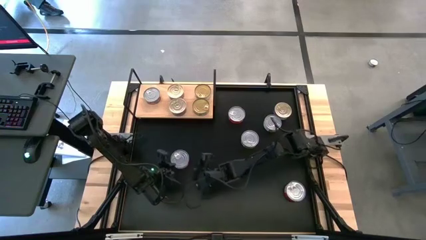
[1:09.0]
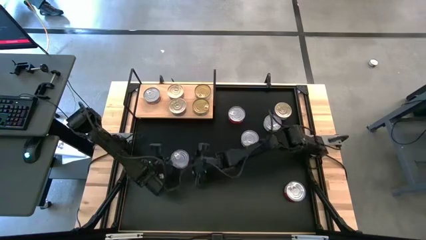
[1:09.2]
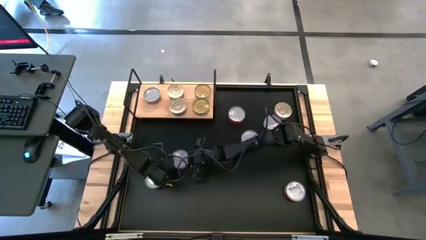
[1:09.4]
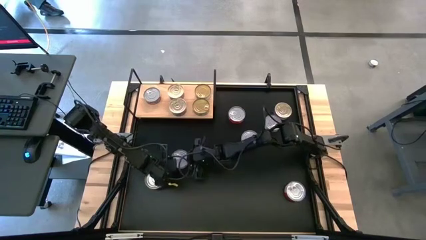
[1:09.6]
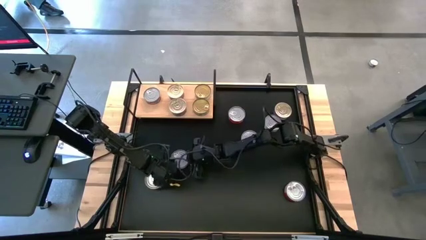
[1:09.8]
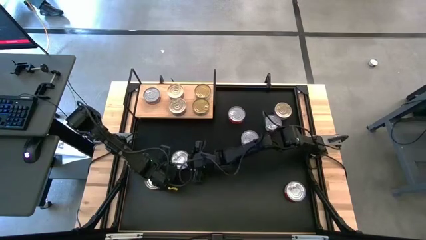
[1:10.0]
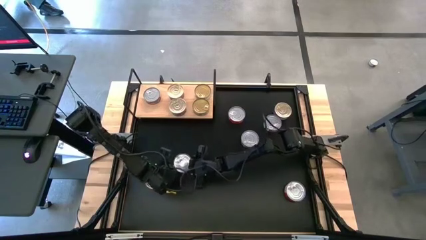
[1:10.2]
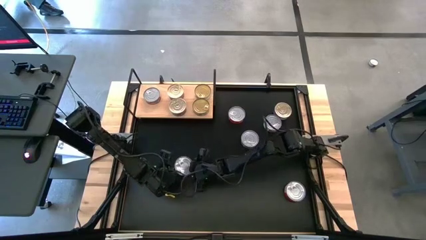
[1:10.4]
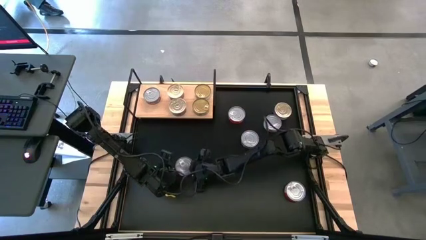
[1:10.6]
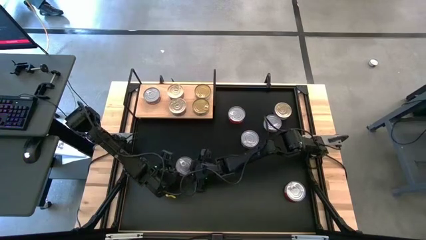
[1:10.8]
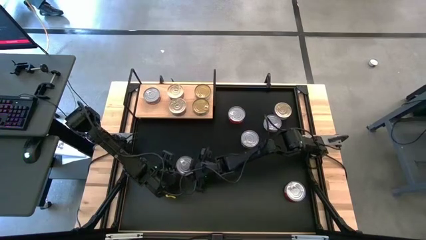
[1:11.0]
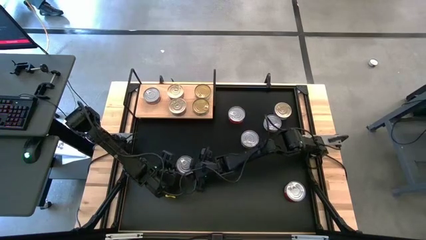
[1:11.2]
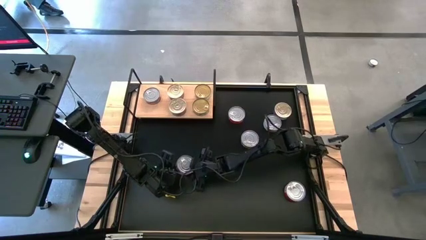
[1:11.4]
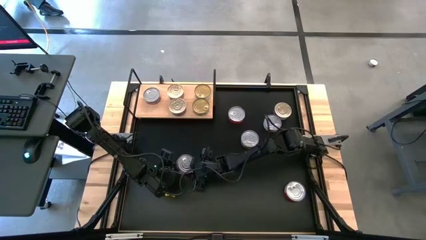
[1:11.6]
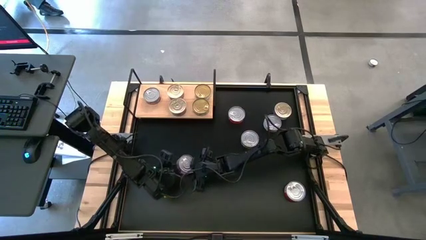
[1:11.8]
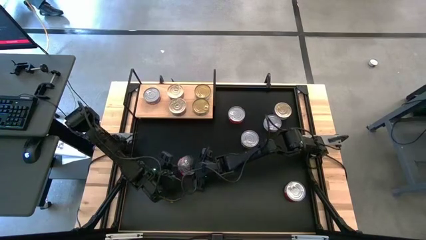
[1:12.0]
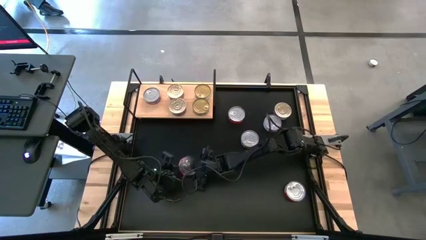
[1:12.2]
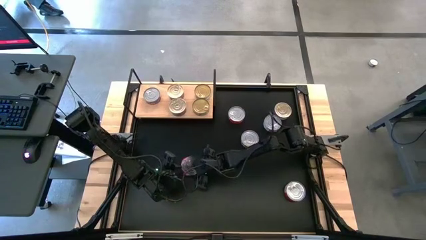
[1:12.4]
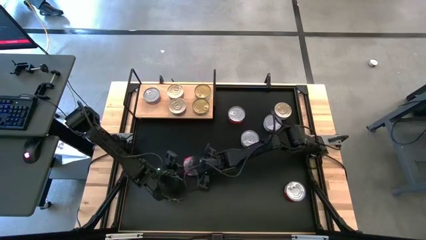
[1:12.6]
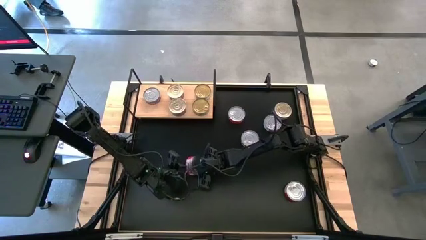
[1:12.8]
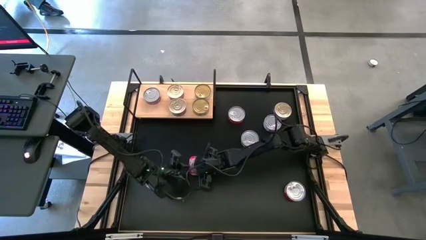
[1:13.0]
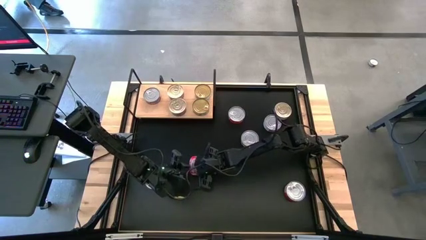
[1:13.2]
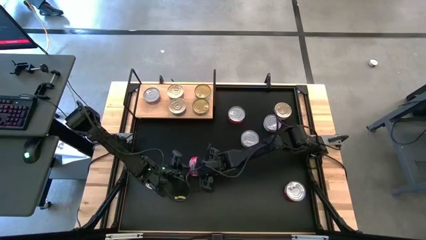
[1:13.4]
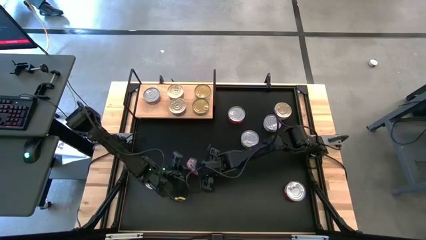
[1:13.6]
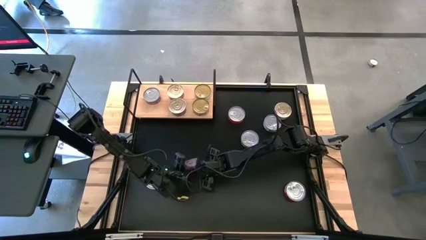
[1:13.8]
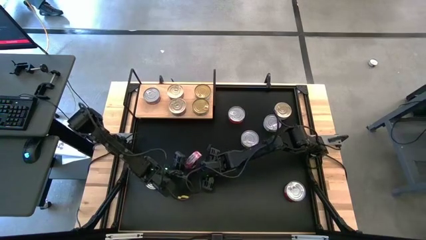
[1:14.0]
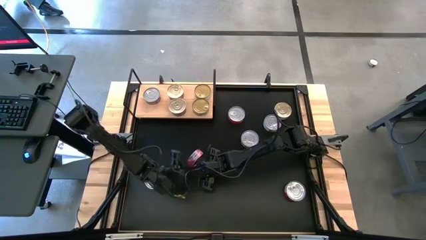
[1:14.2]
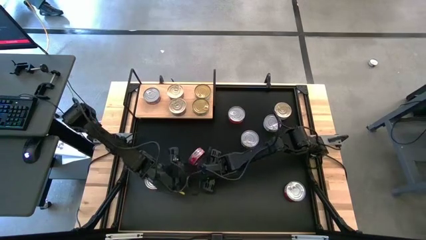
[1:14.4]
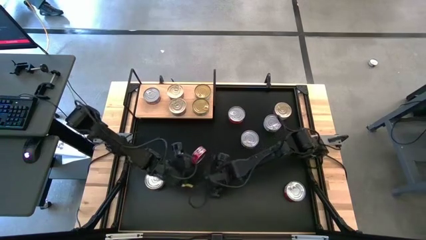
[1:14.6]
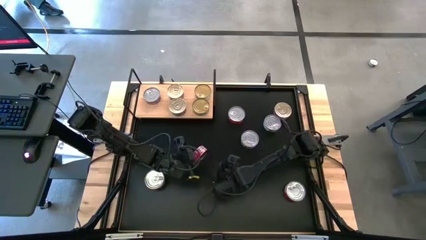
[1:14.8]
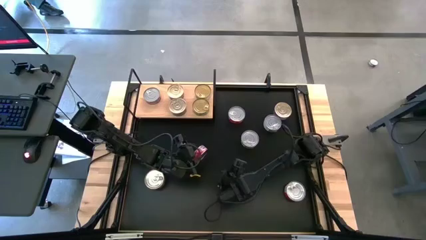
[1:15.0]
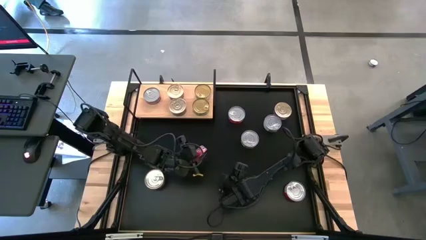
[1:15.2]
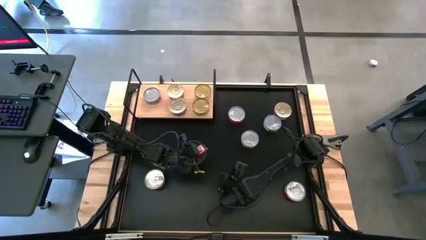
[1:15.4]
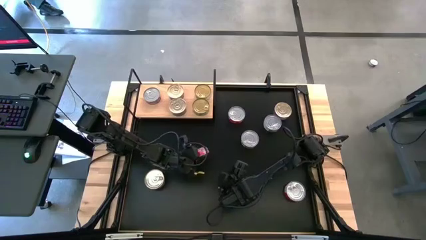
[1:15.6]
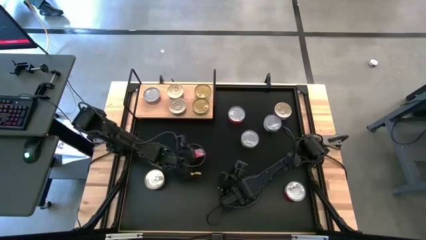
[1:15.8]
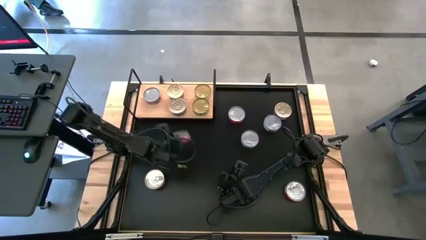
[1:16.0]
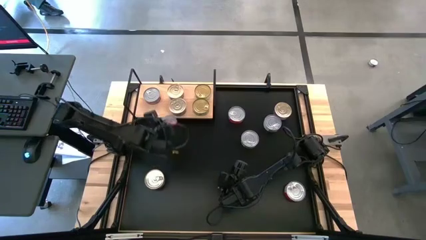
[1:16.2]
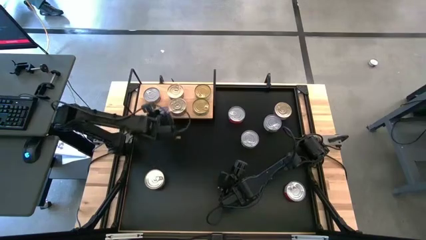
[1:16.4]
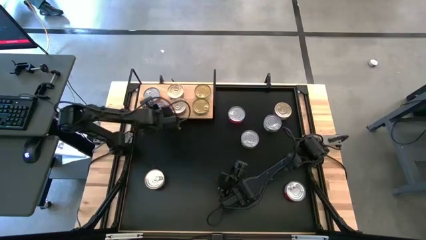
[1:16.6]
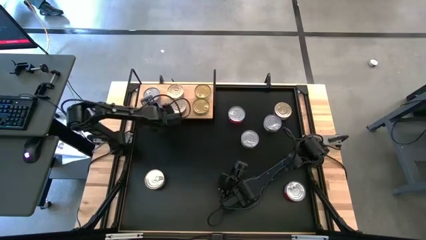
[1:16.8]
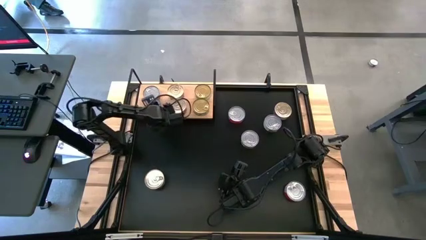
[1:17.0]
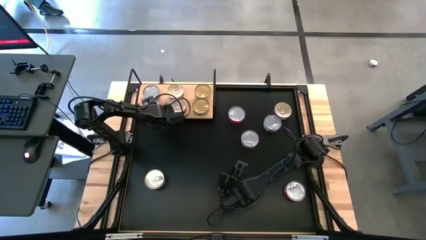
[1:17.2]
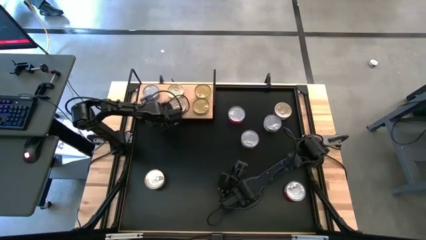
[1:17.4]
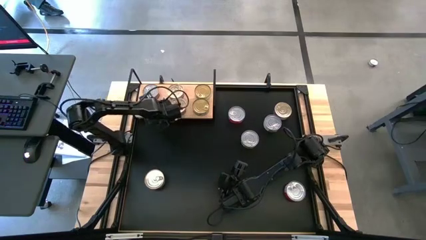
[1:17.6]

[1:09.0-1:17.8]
Task: Stack canned seafood by type on shelf
Put the red tuna can on the shelf aligned with the other red tuna can

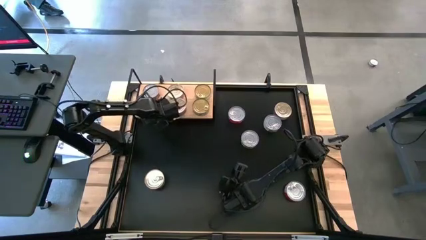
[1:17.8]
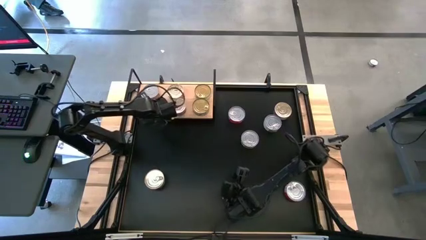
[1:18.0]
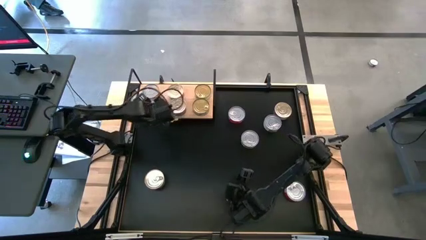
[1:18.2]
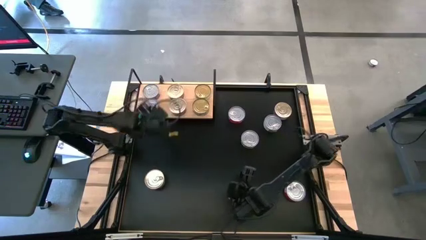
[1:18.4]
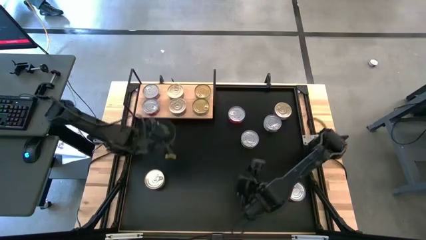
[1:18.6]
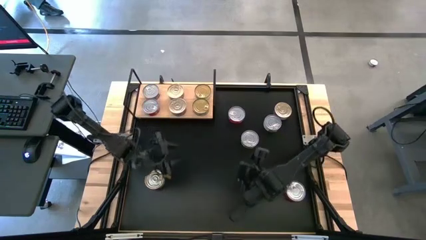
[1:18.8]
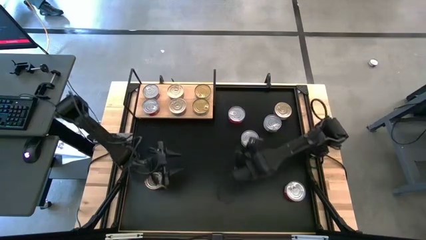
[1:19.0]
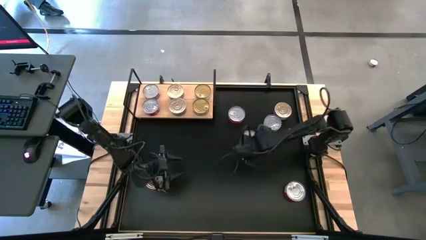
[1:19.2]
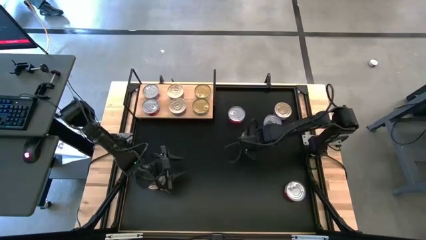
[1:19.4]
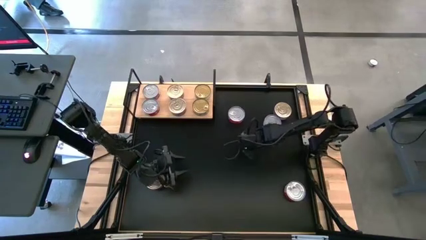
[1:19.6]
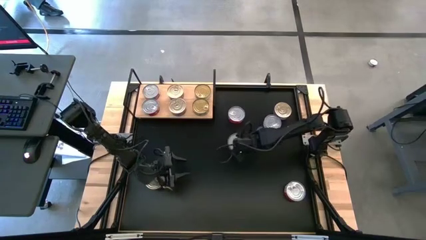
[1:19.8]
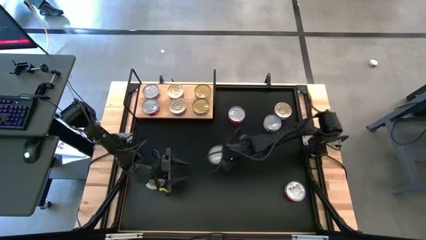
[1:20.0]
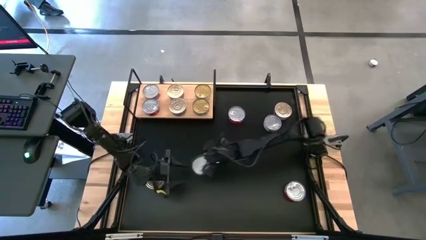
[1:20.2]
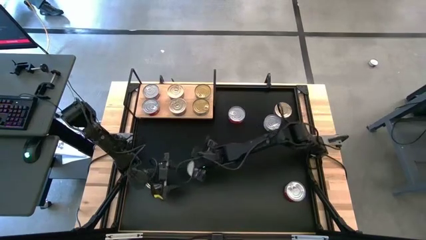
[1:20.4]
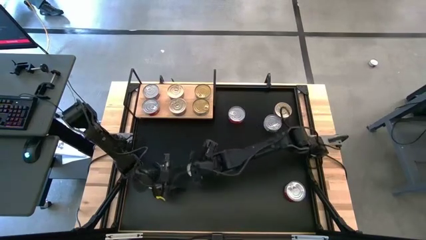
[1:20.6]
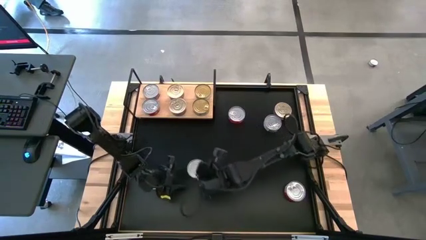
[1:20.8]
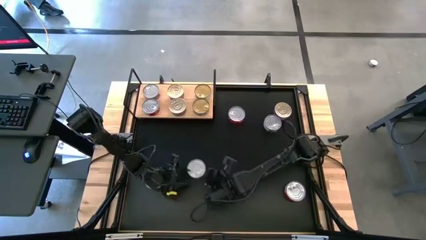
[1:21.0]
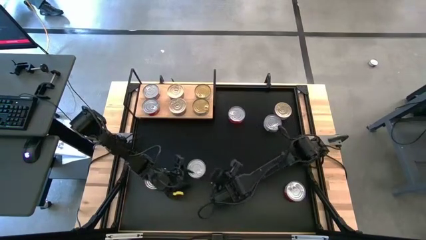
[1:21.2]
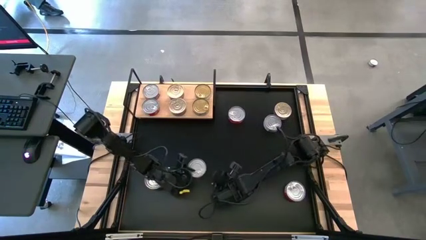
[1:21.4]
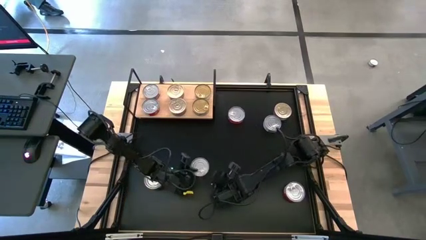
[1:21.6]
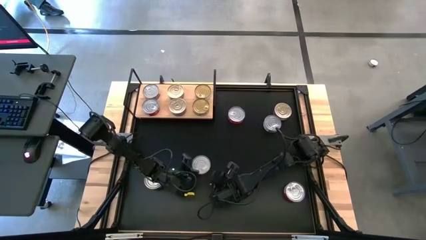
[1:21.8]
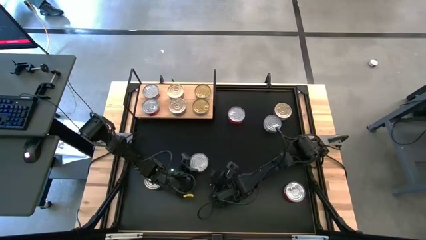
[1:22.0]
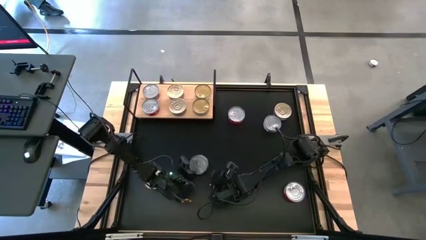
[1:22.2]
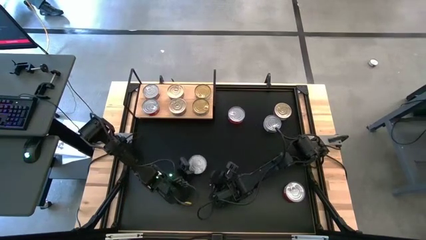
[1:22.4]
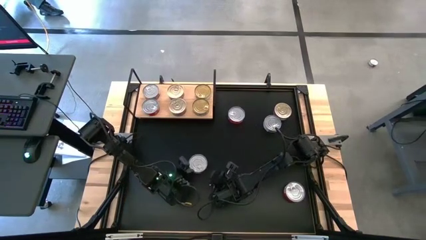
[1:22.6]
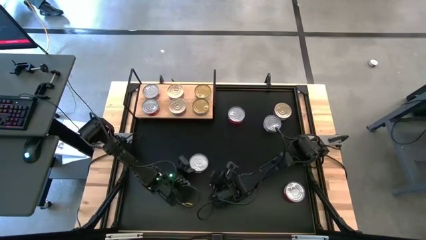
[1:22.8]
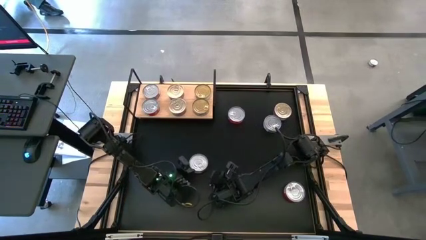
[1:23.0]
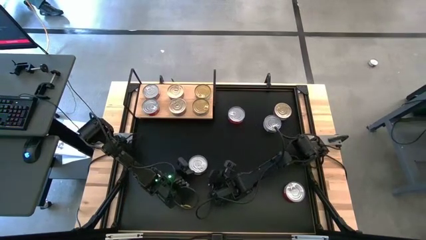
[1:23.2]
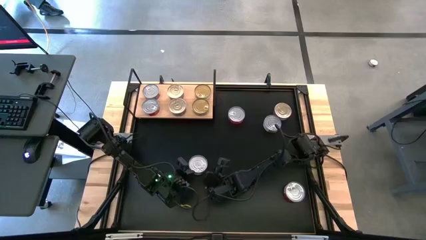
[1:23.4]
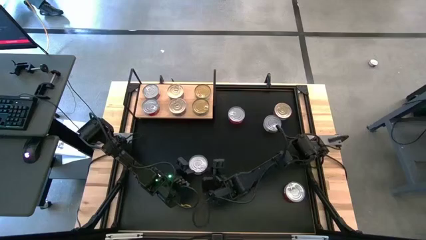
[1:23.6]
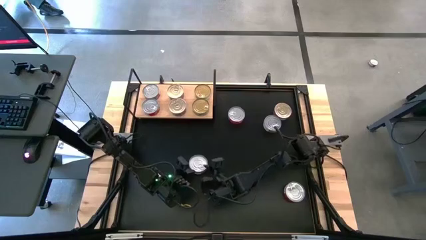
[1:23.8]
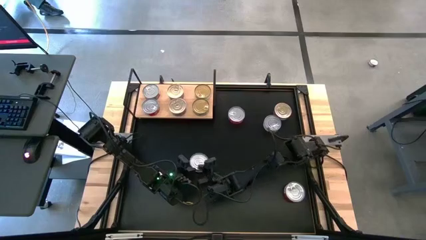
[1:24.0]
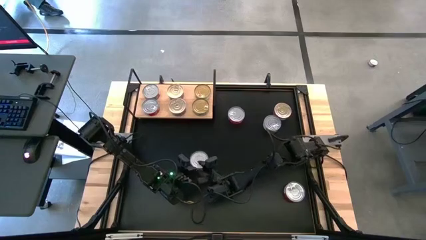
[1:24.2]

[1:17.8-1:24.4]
Stack the green tuna can on the top of the other green tuna can
